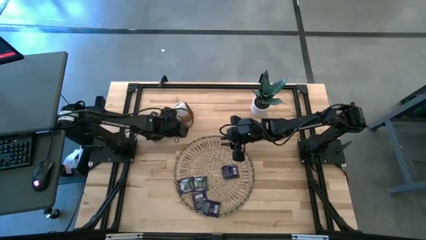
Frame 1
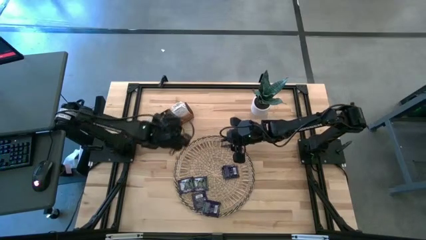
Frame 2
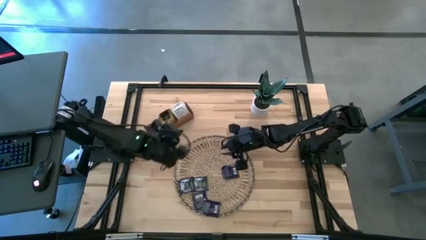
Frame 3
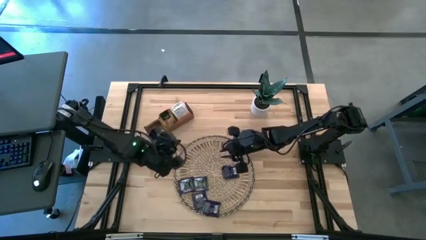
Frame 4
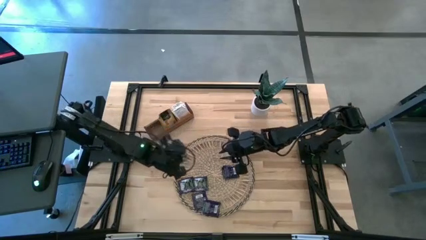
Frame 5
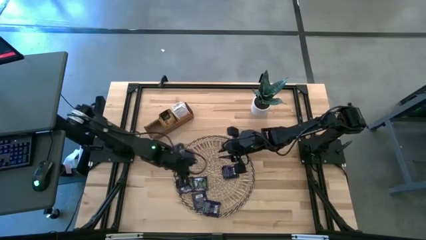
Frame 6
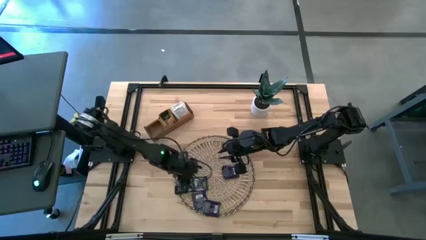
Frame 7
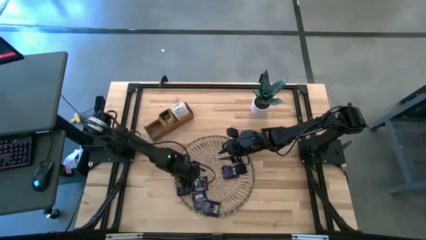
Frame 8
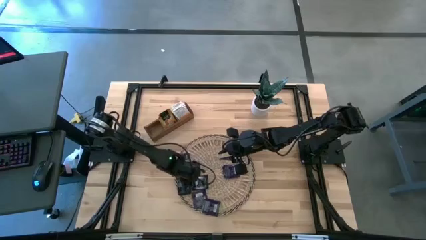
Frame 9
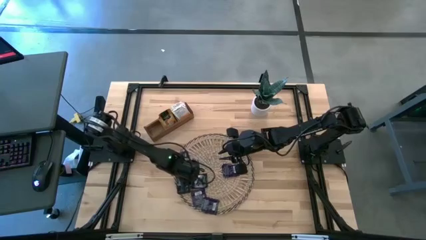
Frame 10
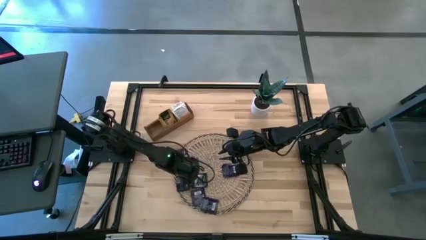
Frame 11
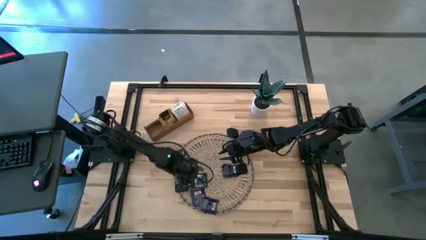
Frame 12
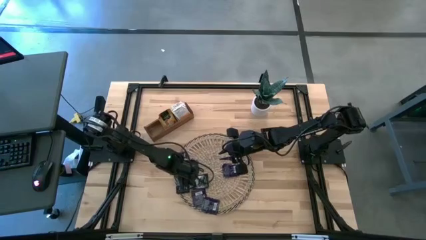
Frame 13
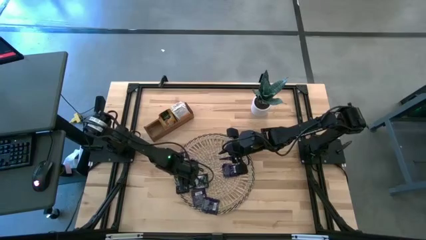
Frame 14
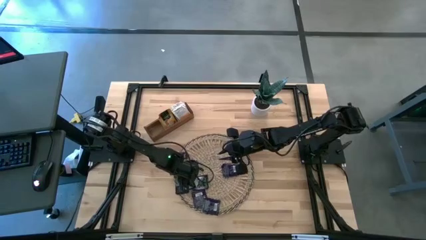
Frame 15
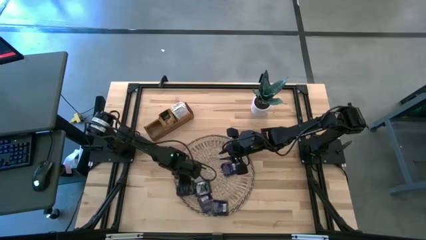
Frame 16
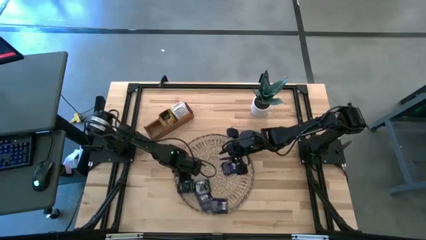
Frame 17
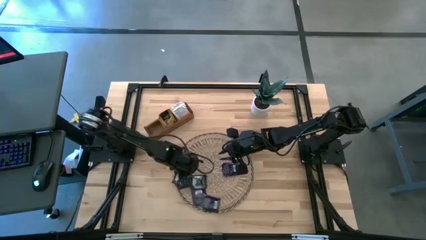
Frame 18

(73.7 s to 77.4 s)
Task: Pick & Place Tea
Put the black tea bag into the left compartment of the wooden organizer

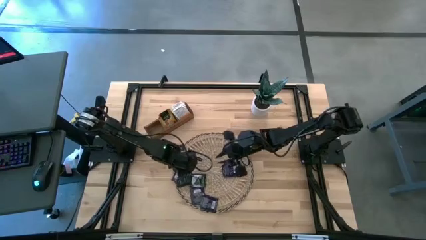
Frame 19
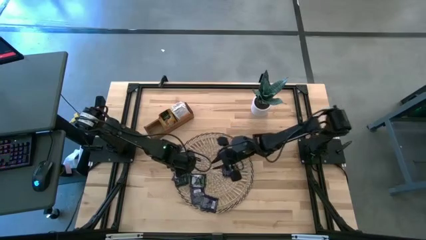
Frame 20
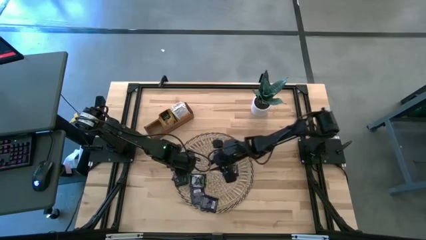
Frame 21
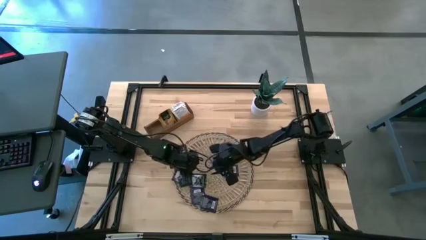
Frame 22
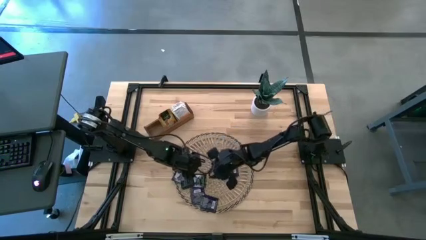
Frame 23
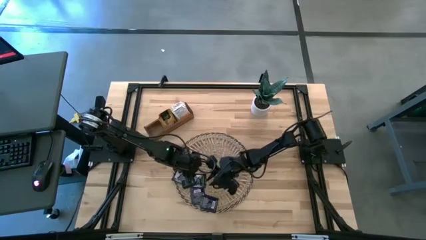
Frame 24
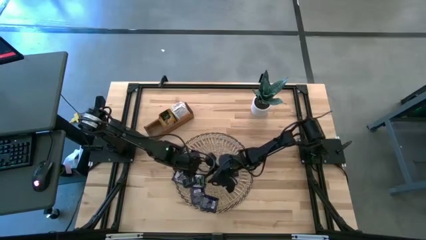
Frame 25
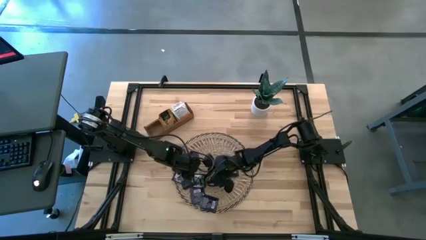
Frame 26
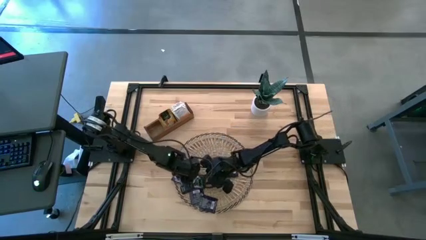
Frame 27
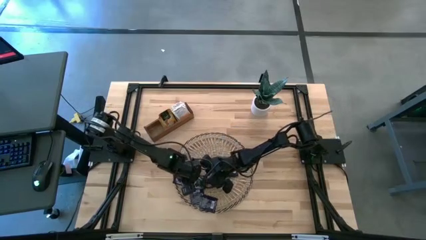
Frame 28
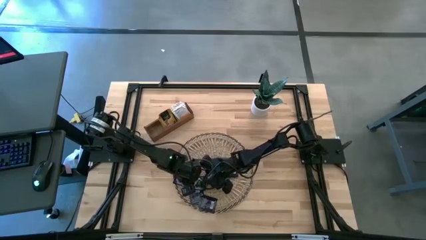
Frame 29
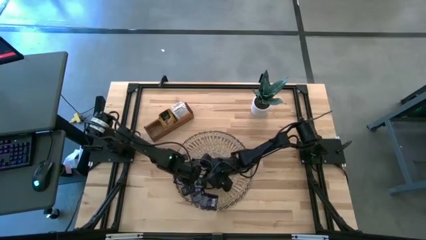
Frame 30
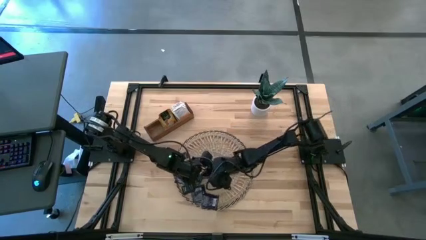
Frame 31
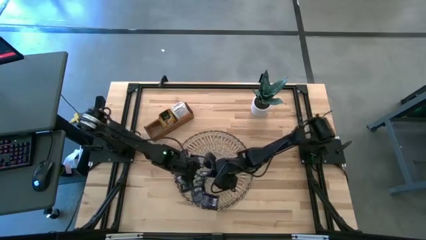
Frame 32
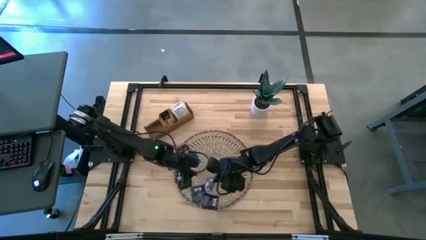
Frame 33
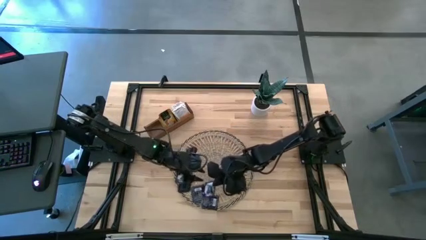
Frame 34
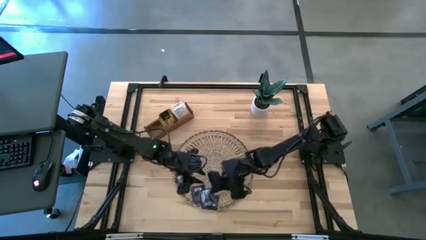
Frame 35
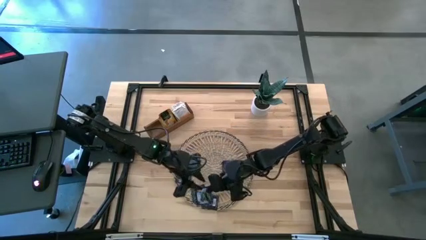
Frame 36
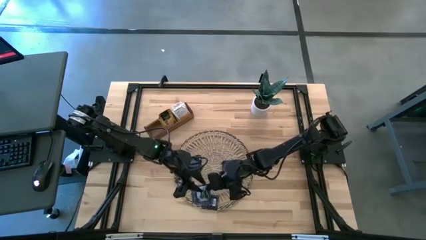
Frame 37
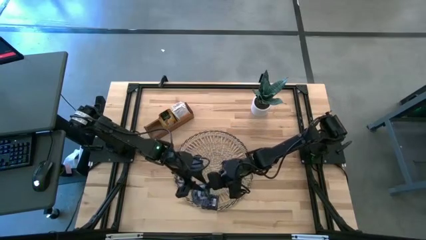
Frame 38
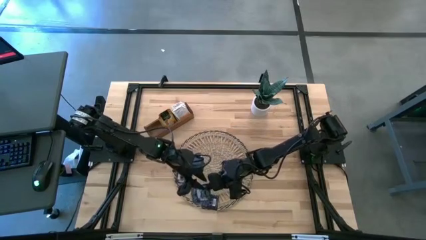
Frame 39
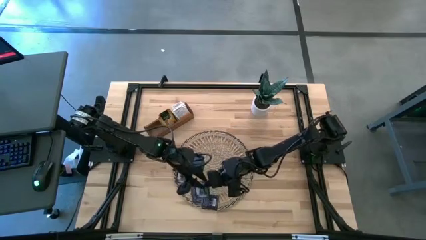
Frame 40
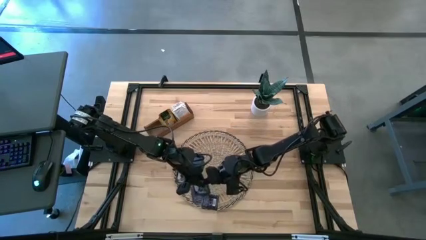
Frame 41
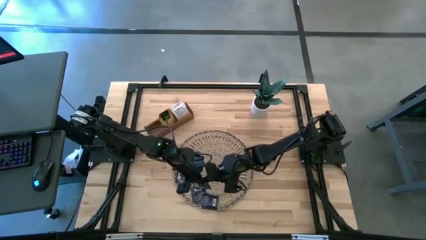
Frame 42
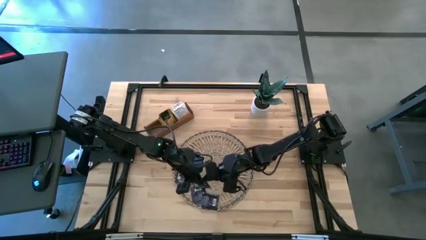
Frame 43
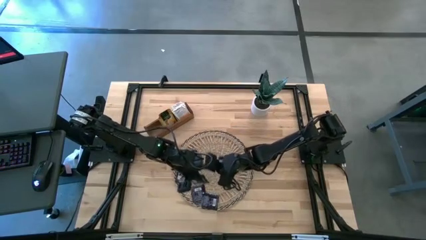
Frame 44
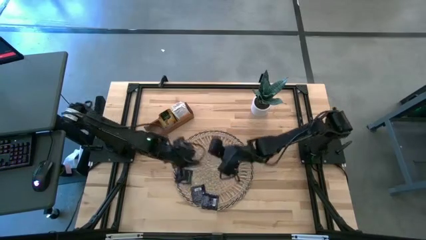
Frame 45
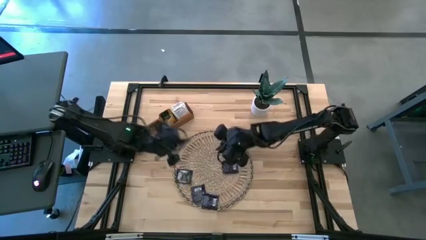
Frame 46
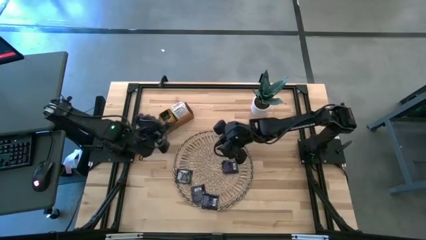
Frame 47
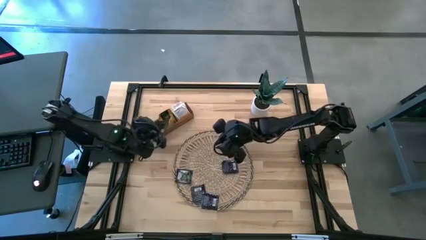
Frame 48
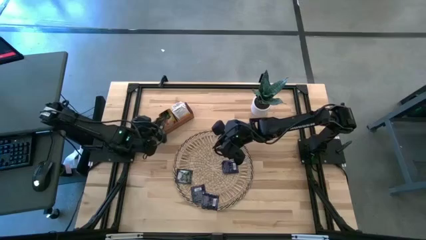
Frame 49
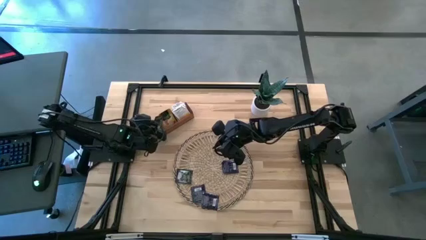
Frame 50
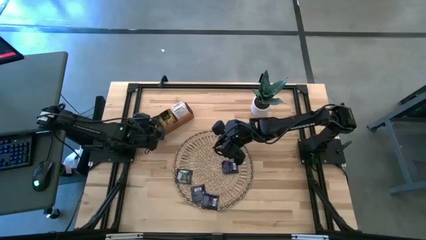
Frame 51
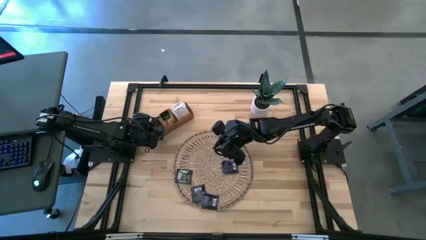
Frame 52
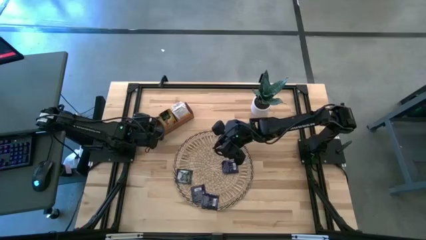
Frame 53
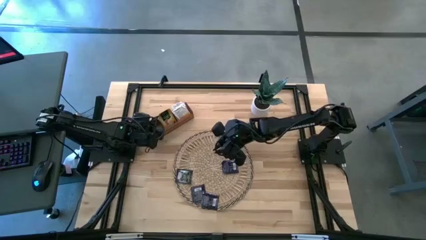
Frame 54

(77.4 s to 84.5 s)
Put the black tea bag into the left compartment of the wooden organizer

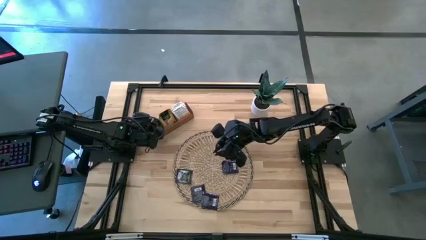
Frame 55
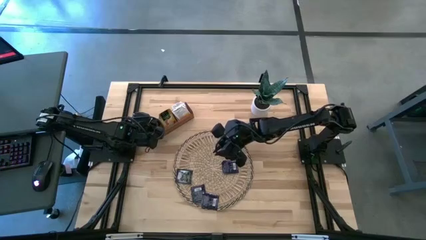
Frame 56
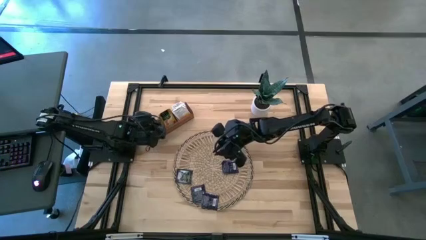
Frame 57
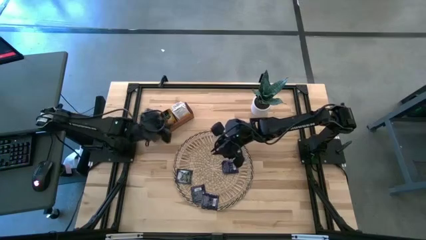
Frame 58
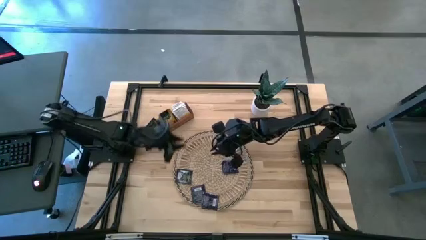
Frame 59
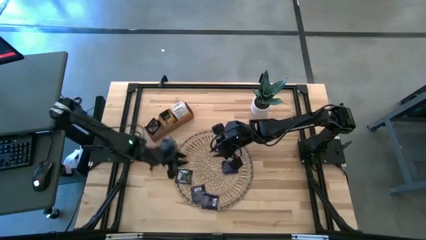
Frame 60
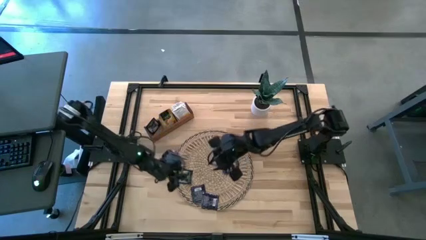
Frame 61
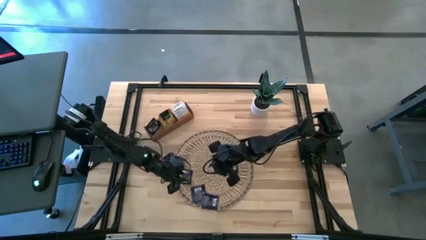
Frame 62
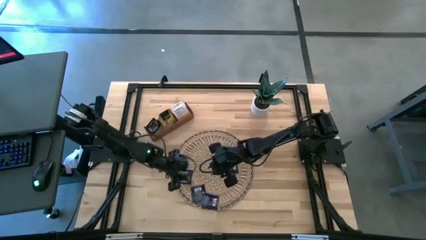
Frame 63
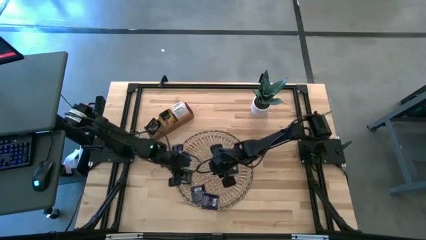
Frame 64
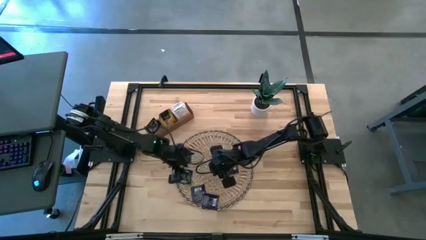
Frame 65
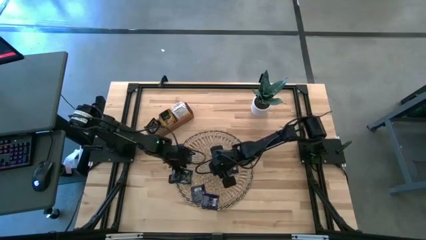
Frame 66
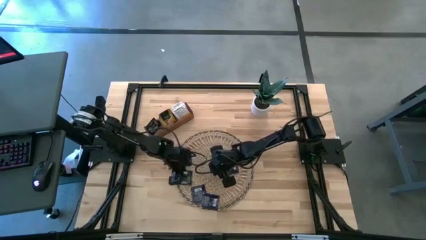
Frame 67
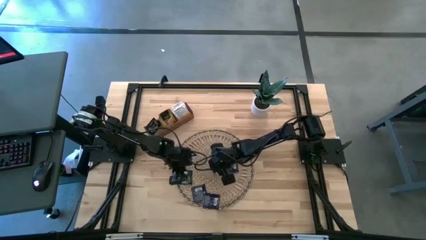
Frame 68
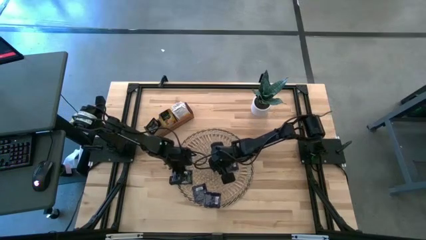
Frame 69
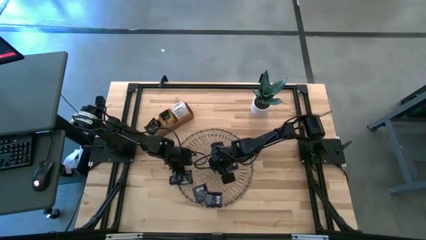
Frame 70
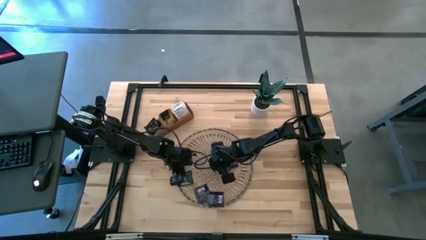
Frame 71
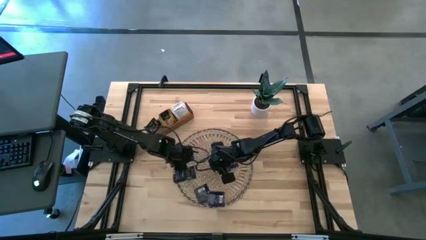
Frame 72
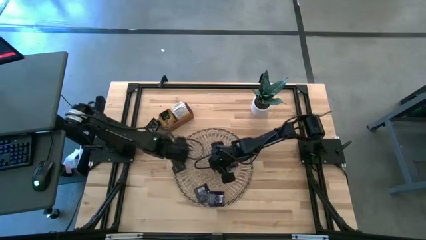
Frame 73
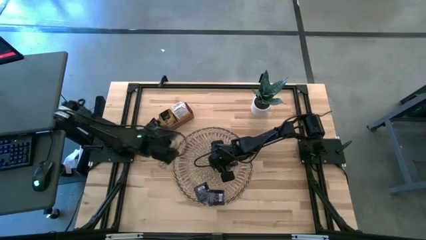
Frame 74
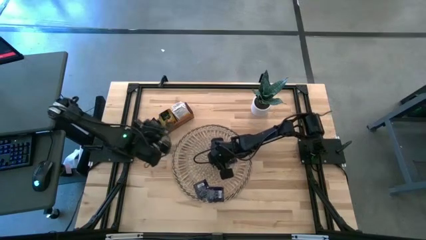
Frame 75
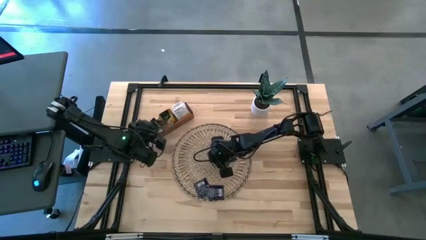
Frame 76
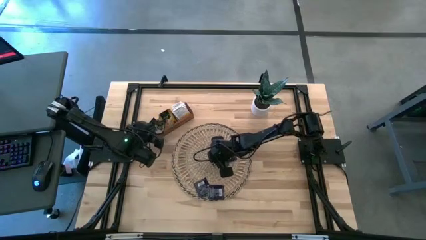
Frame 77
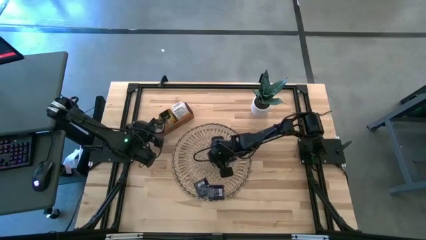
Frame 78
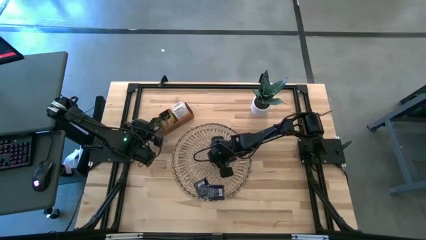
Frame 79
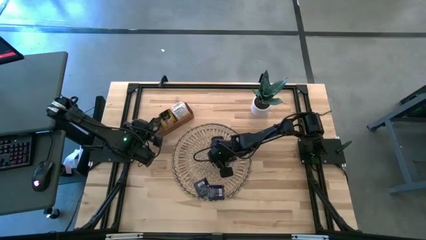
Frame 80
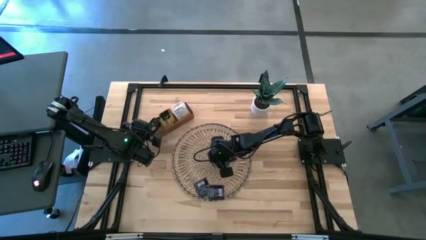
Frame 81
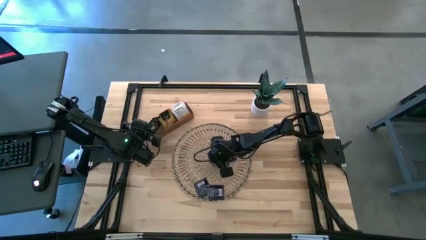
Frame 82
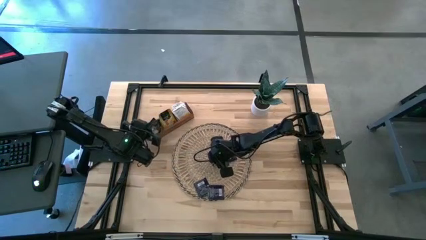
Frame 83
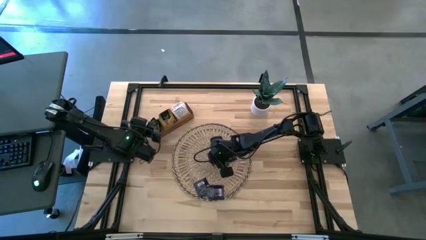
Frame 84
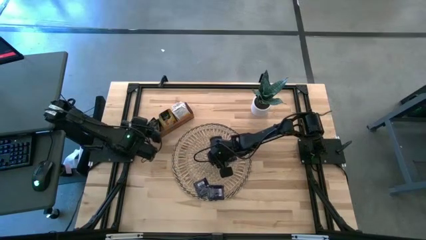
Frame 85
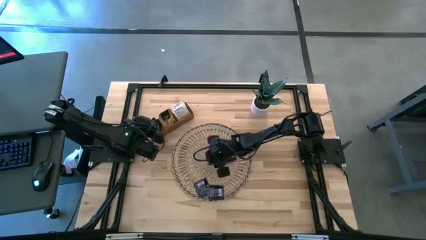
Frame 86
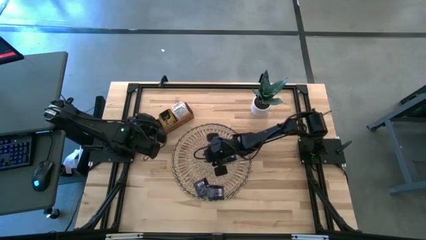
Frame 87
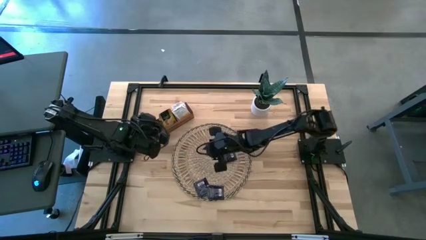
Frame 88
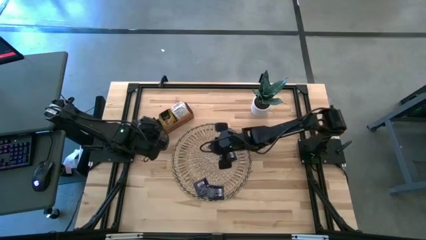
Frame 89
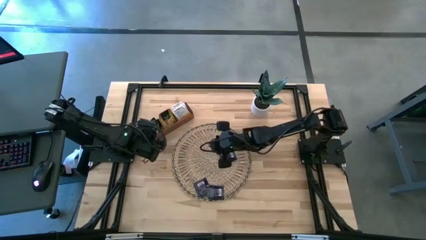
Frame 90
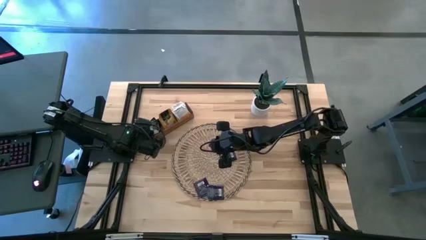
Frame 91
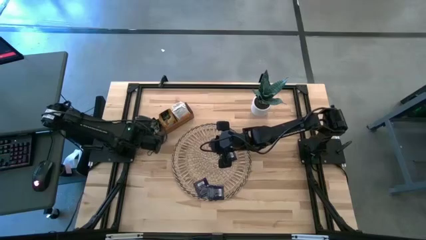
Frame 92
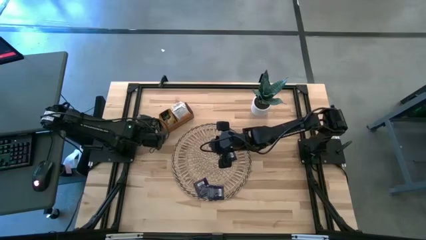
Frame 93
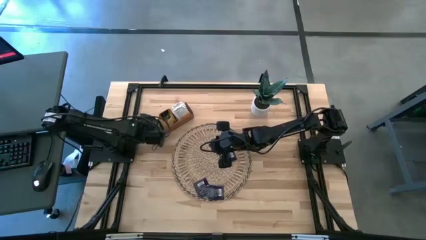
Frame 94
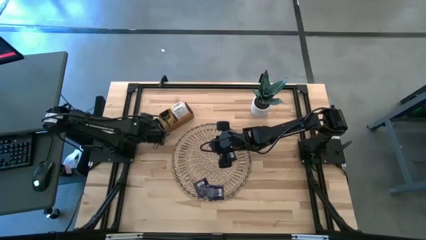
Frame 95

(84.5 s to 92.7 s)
Put the black tea bag into the left compartment of the wooden organizer
